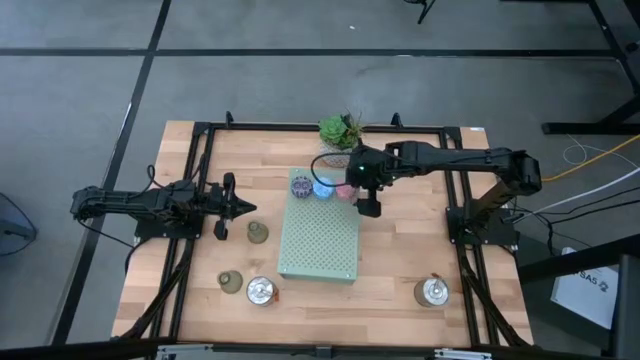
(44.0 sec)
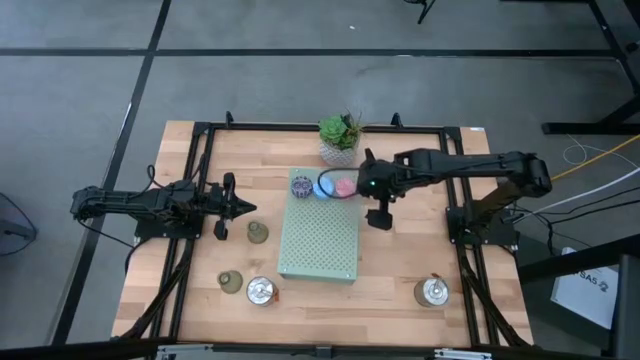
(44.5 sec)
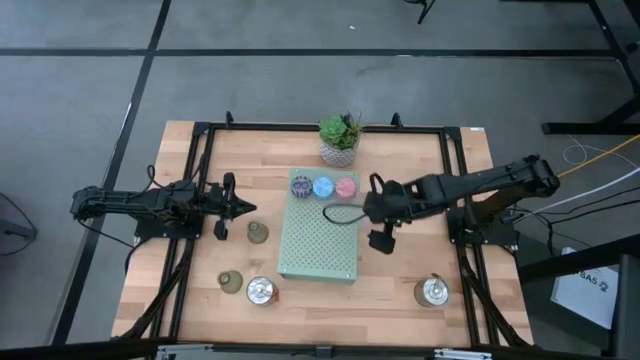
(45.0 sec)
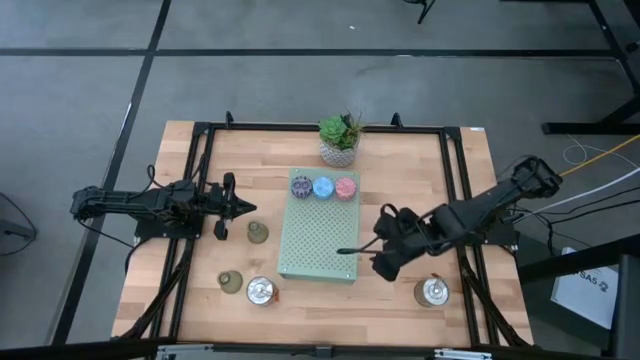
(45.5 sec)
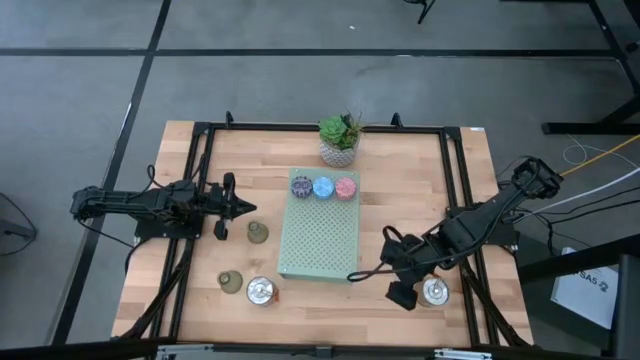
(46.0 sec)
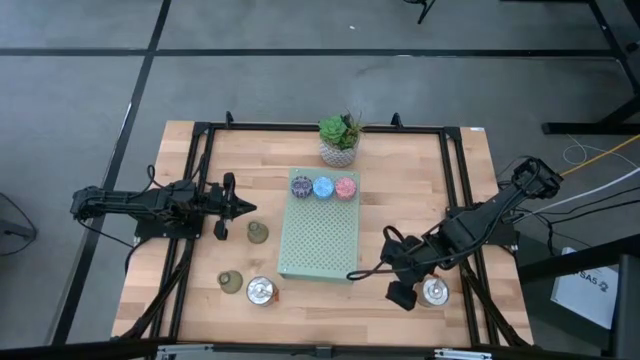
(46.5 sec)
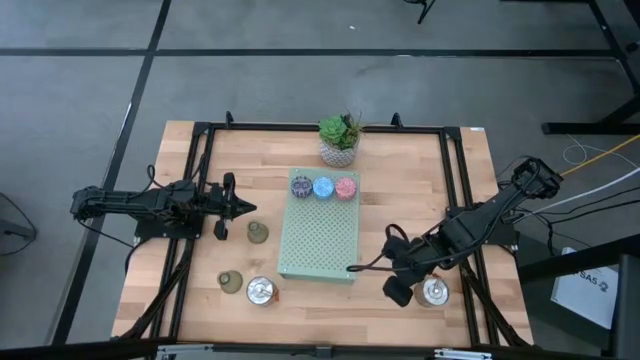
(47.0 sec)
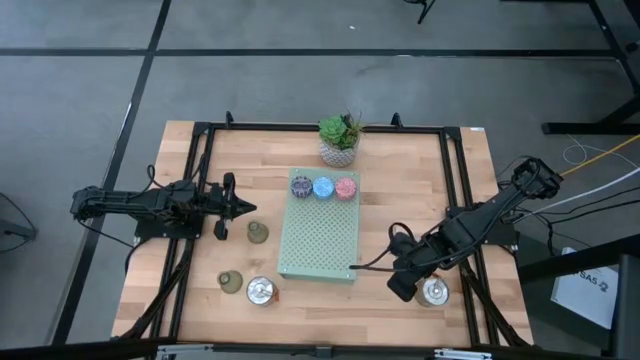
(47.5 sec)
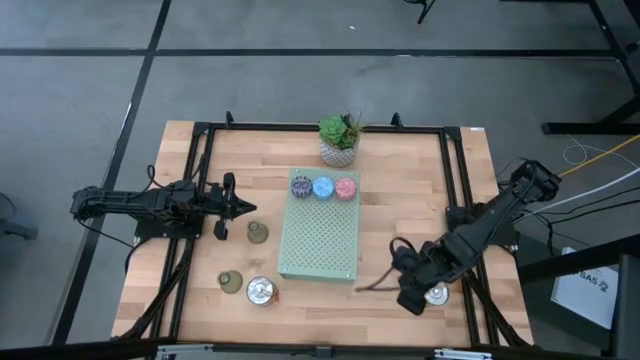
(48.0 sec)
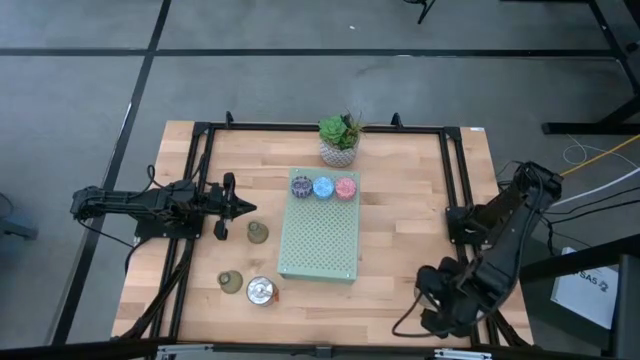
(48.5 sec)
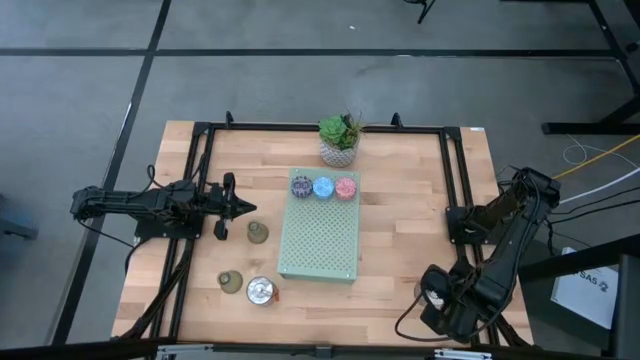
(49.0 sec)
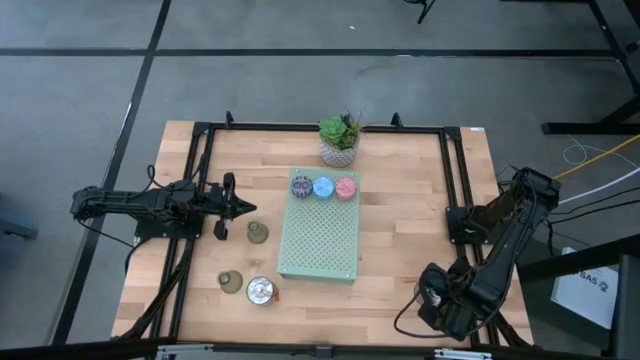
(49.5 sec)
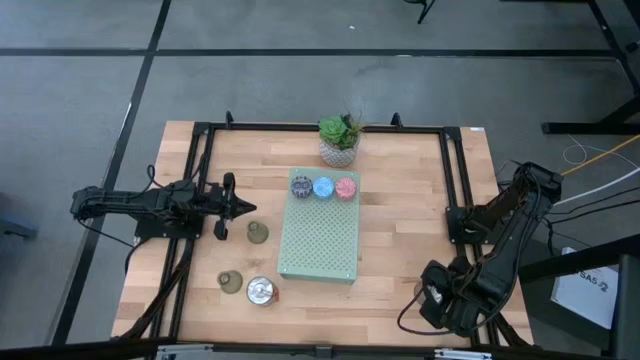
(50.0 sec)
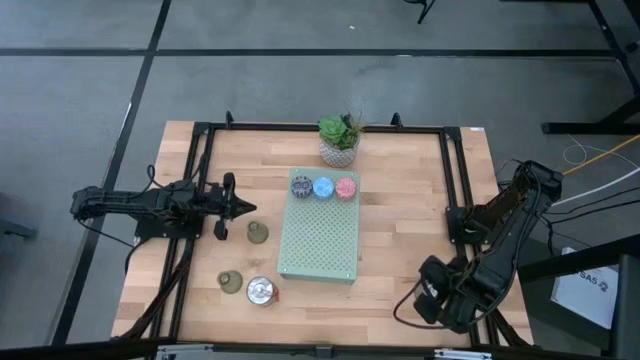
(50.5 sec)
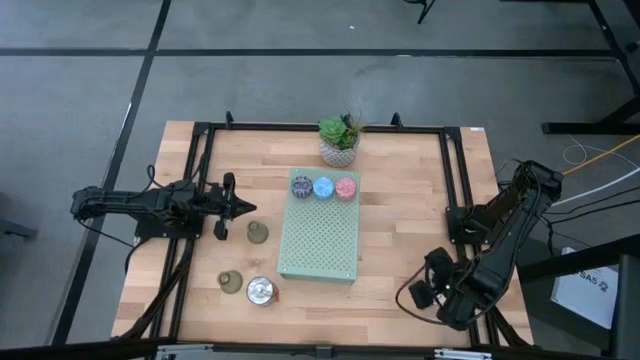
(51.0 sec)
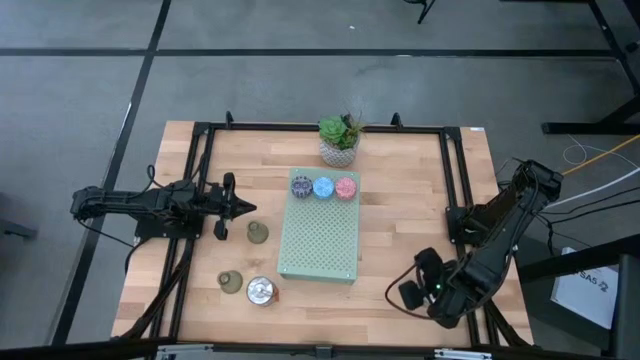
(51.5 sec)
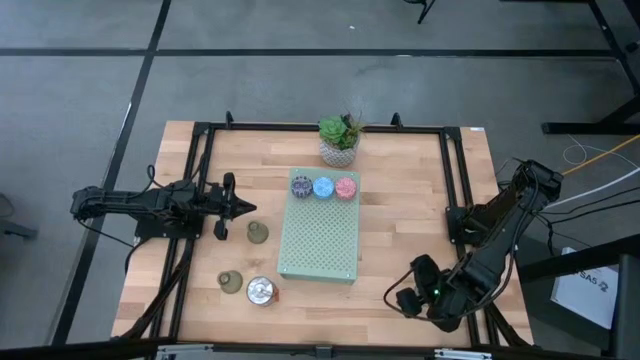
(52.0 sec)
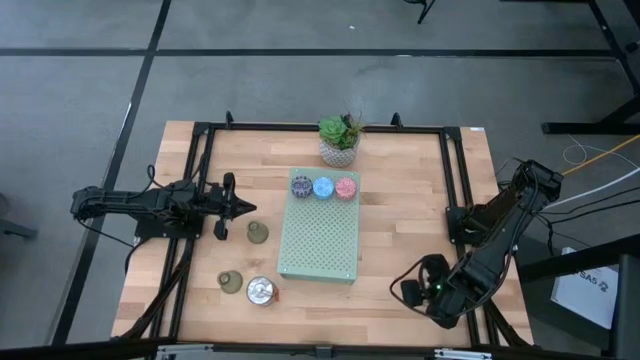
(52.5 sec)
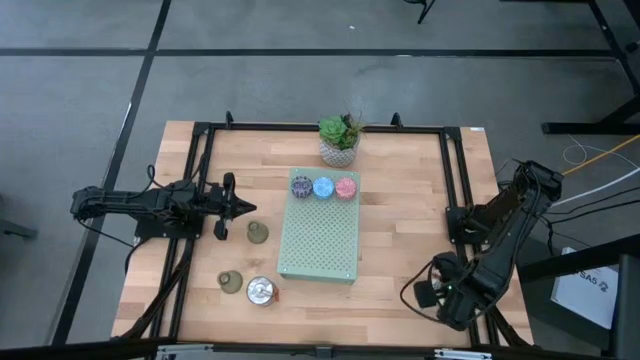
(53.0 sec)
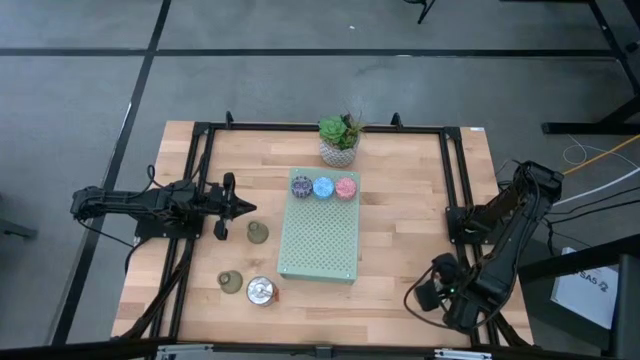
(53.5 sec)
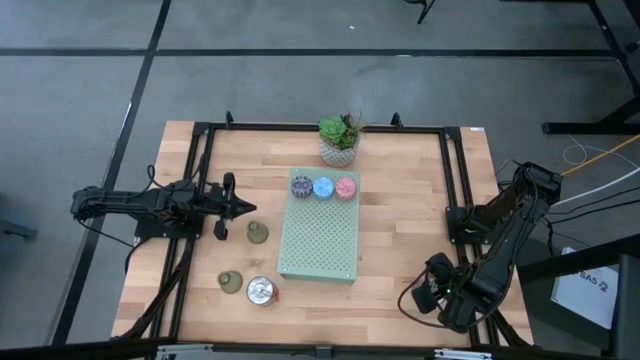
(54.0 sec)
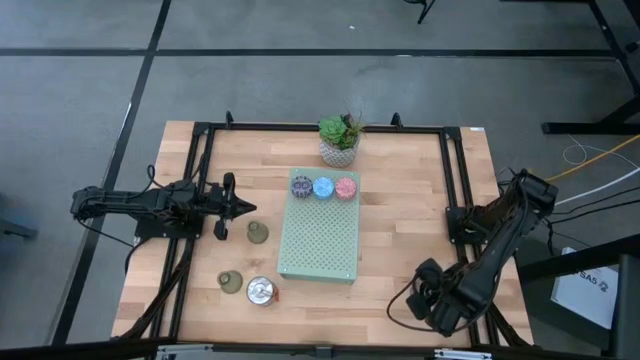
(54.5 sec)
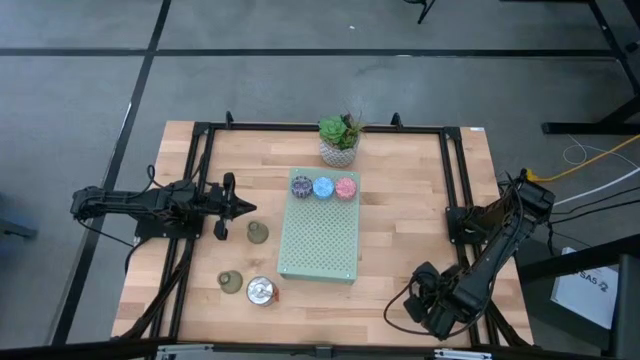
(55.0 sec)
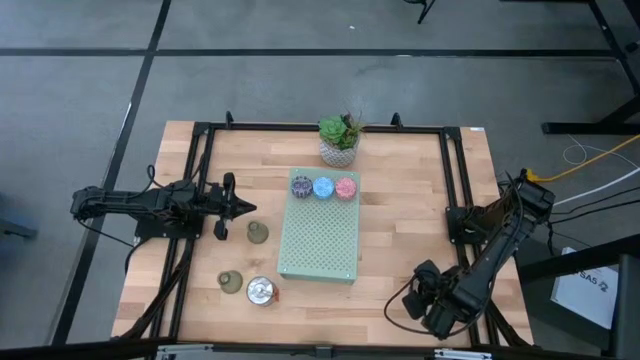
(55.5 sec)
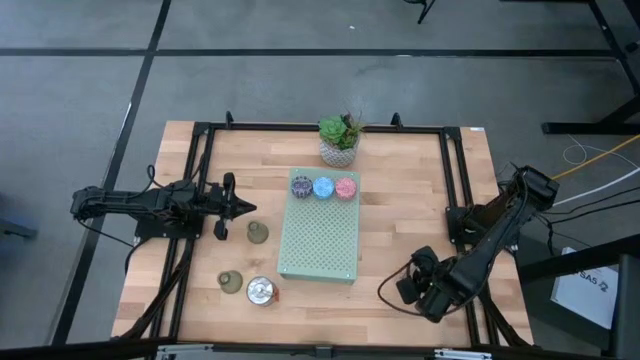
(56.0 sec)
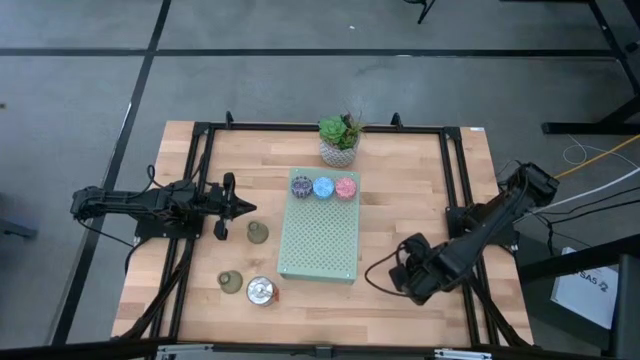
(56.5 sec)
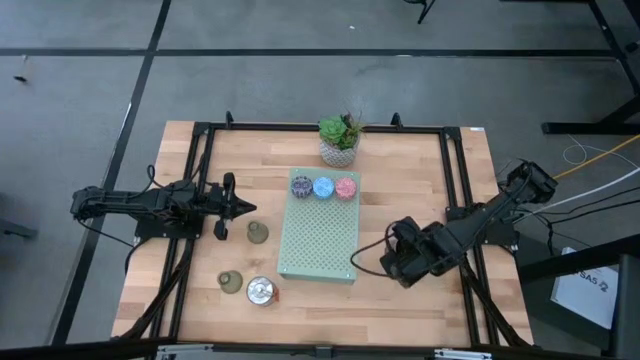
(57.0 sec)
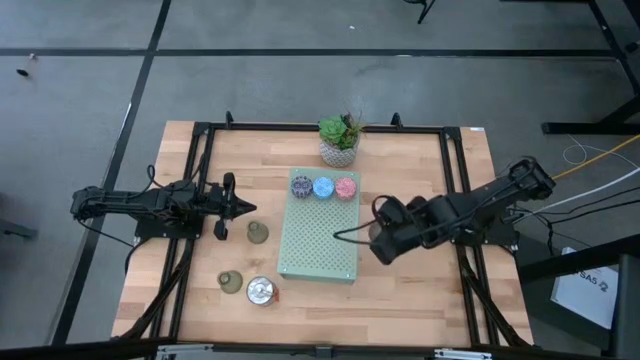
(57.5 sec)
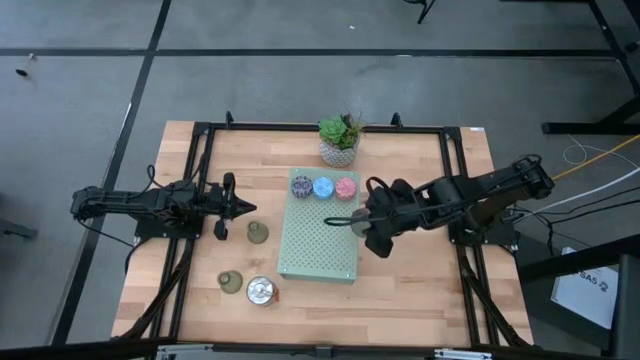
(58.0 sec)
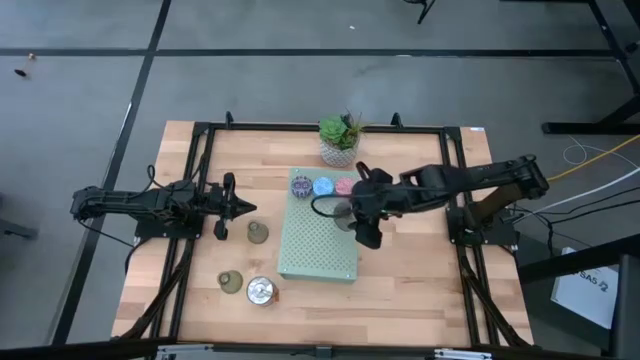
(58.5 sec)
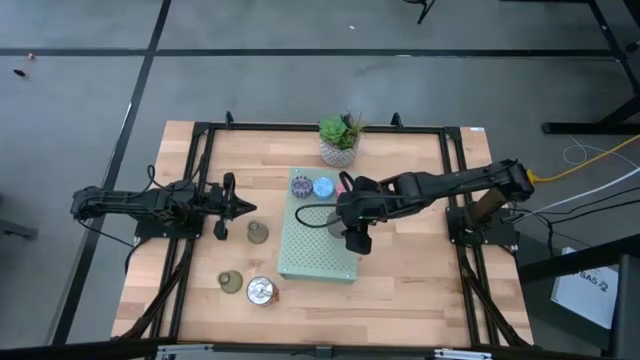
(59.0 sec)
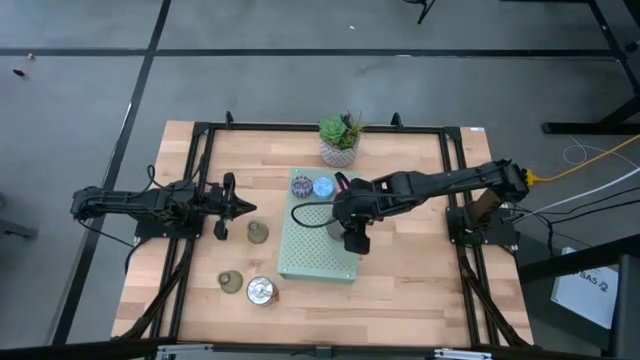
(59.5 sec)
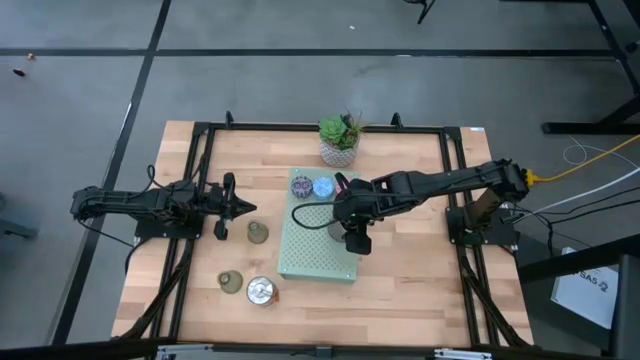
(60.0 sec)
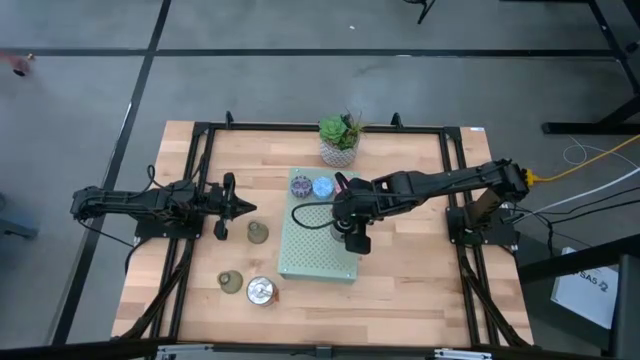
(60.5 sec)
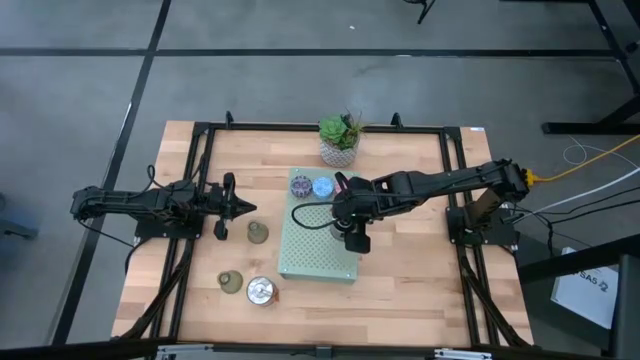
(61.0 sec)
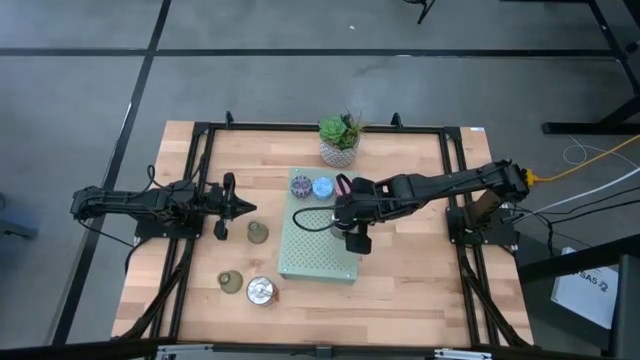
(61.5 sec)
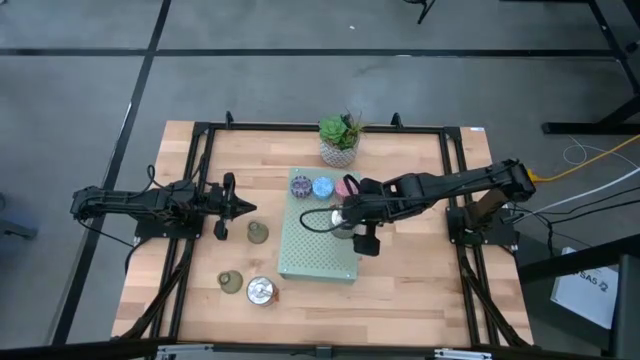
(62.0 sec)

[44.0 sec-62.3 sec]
Task: Pick & Place candle stick holders
Put the right silver scented candle on the shelf

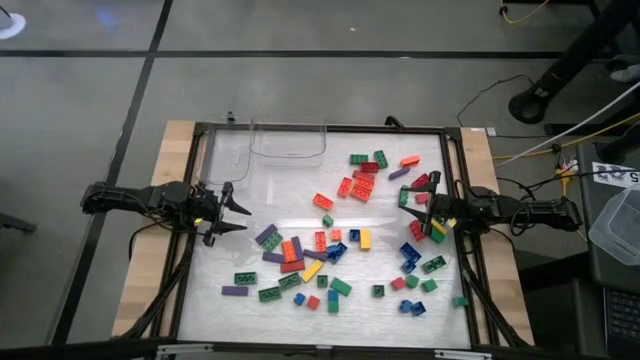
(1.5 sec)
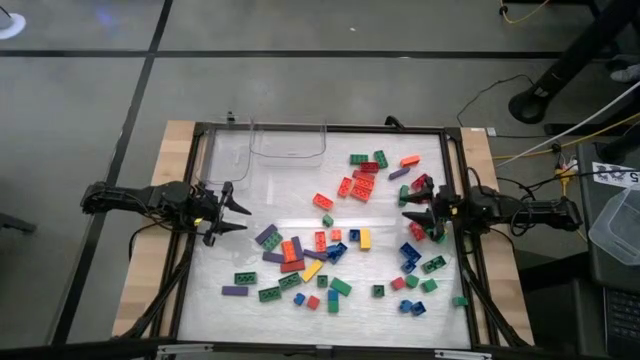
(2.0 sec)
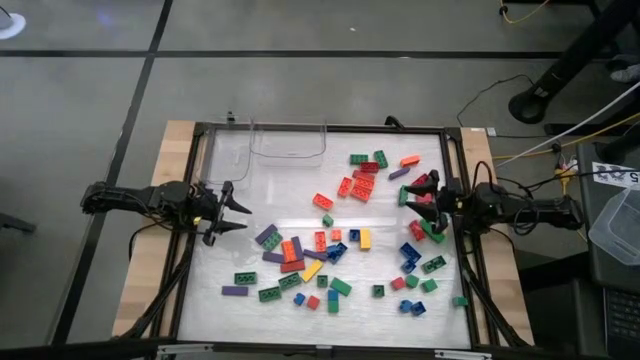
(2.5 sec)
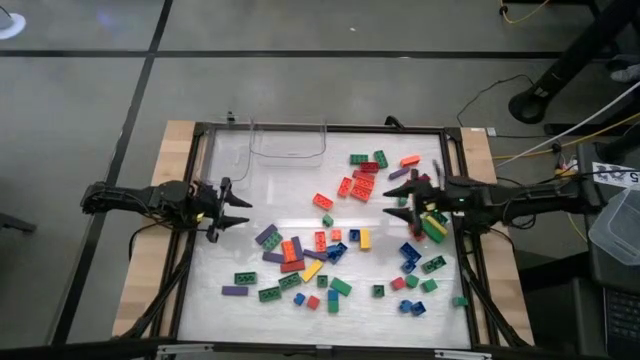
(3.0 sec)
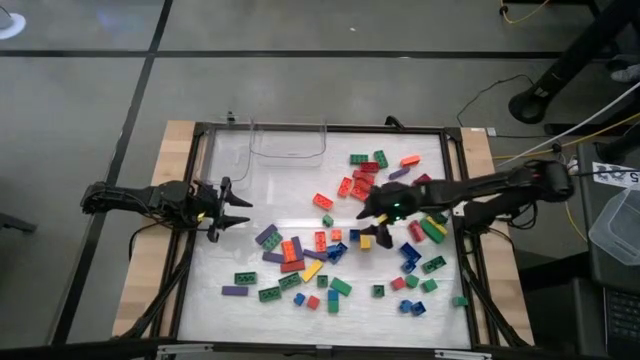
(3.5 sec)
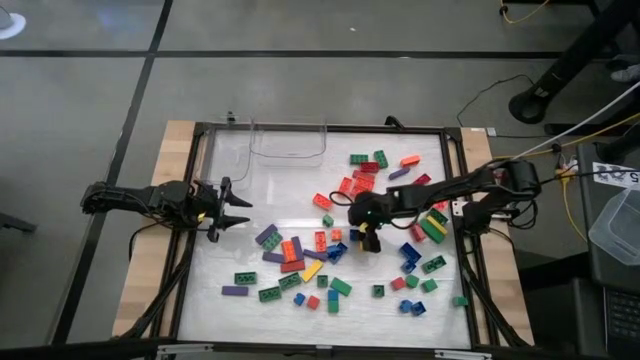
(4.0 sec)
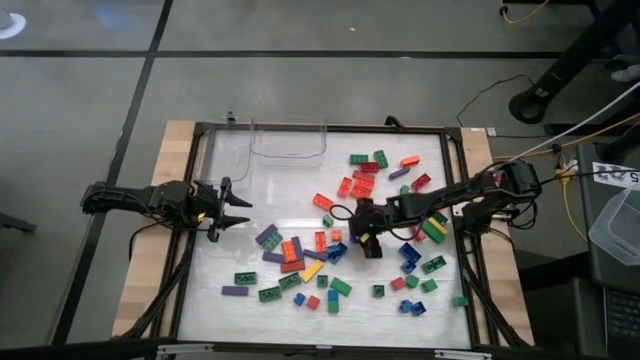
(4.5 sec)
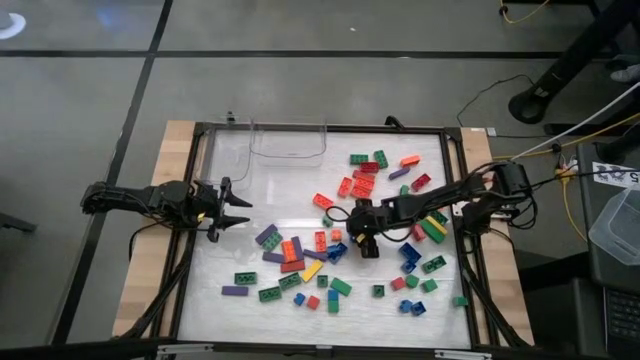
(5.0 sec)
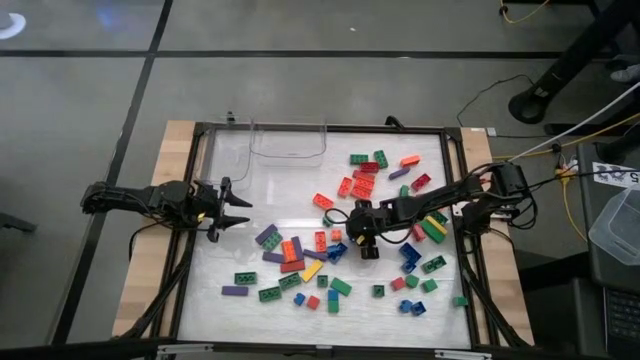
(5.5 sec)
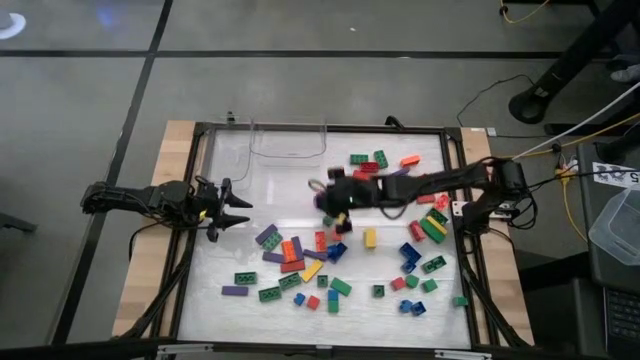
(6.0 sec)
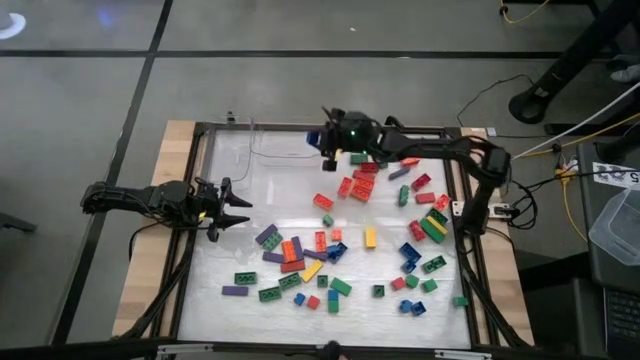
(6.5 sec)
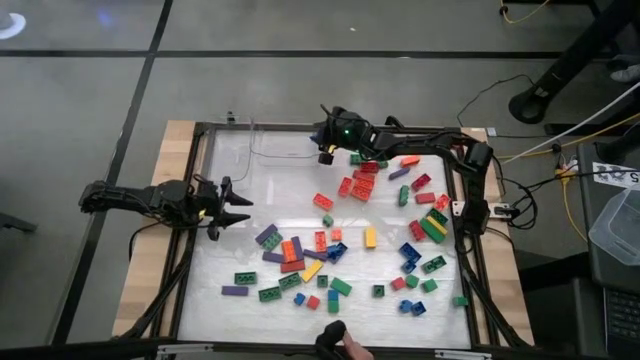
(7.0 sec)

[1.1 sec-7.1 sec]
Task: Sort blocks by size
Put the small blue game piece into the right transparent bin
